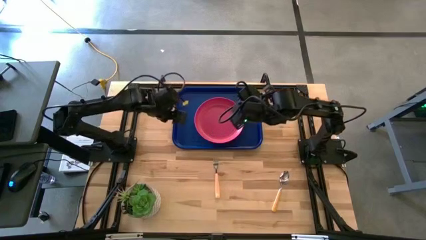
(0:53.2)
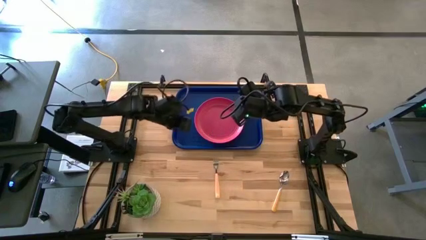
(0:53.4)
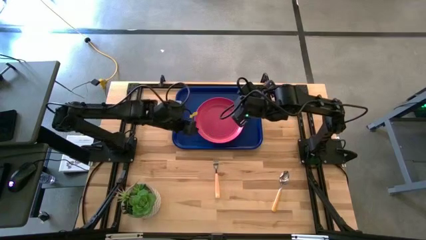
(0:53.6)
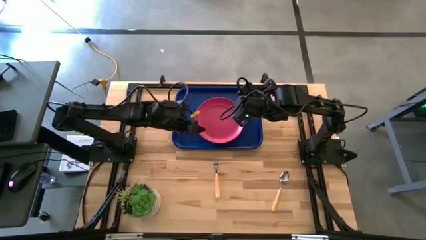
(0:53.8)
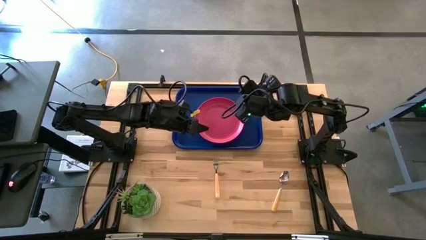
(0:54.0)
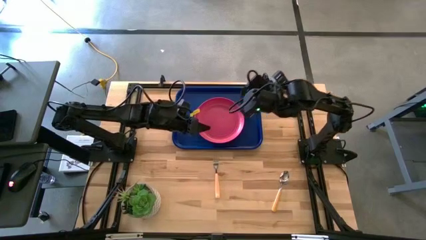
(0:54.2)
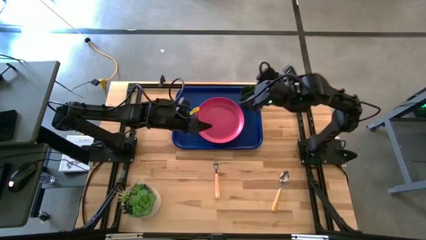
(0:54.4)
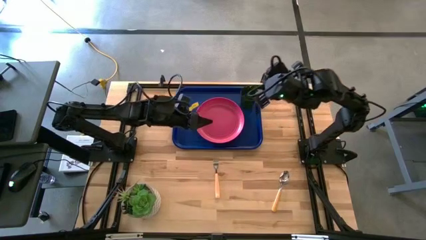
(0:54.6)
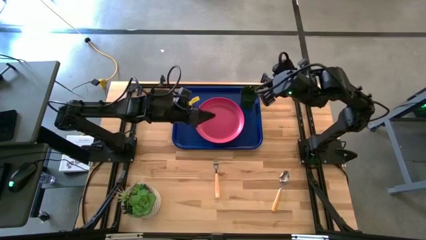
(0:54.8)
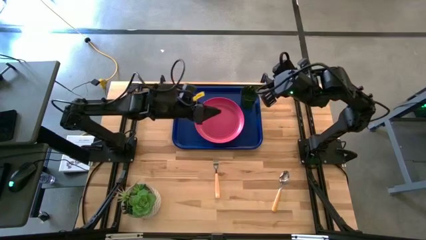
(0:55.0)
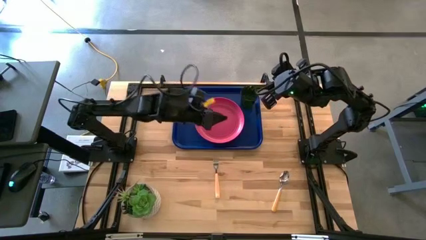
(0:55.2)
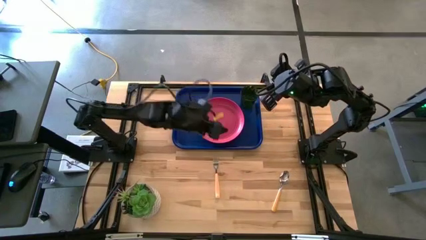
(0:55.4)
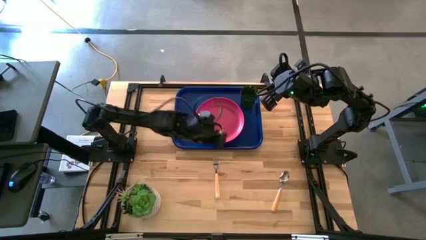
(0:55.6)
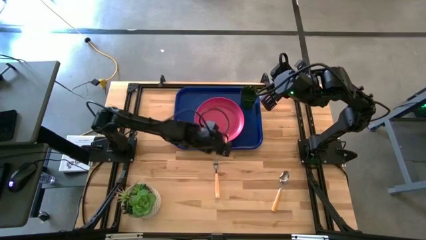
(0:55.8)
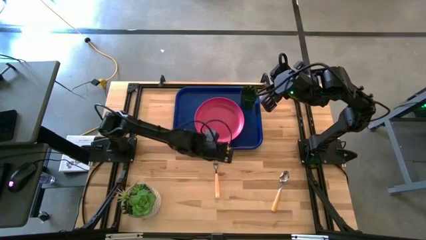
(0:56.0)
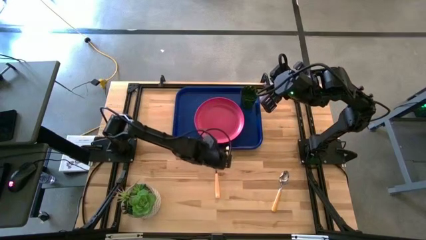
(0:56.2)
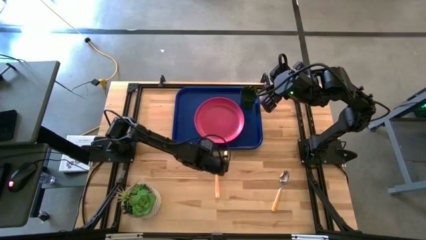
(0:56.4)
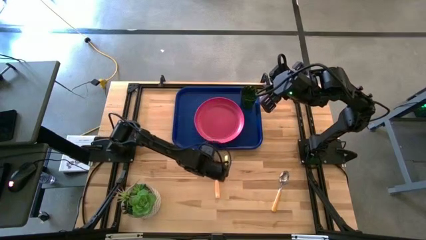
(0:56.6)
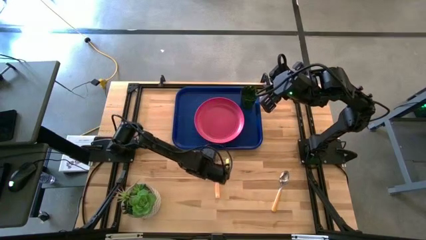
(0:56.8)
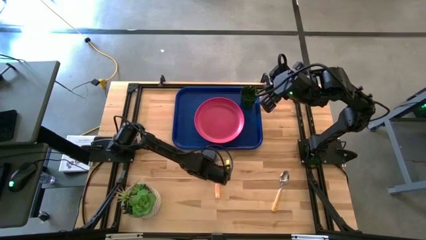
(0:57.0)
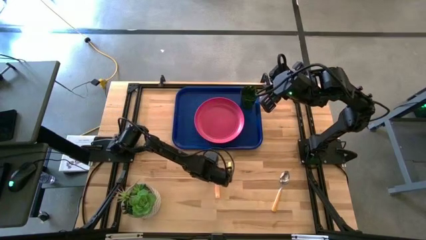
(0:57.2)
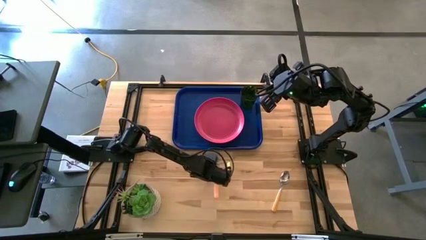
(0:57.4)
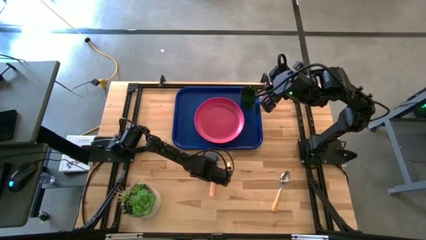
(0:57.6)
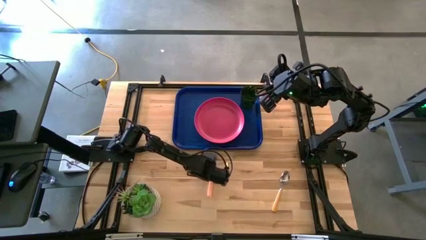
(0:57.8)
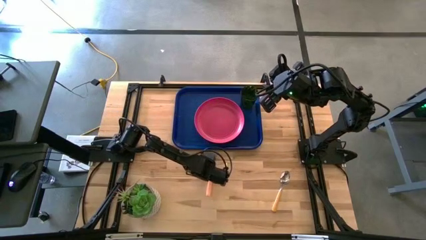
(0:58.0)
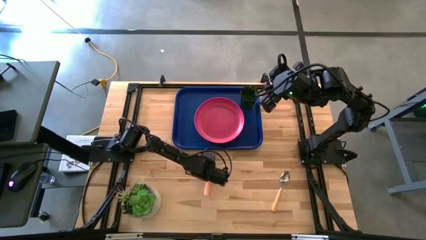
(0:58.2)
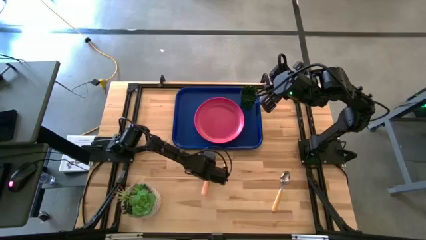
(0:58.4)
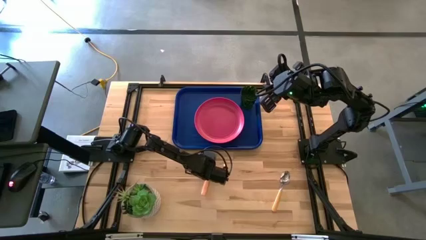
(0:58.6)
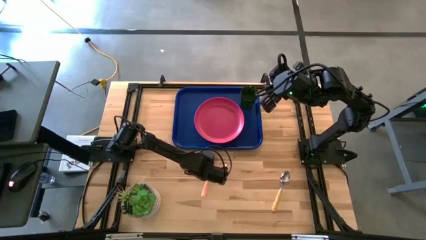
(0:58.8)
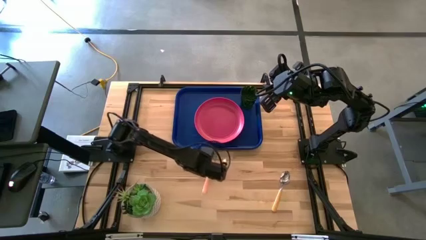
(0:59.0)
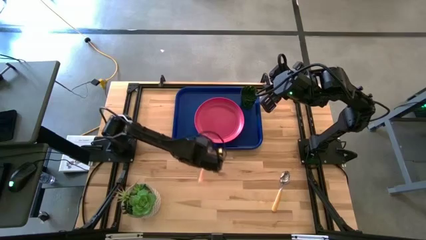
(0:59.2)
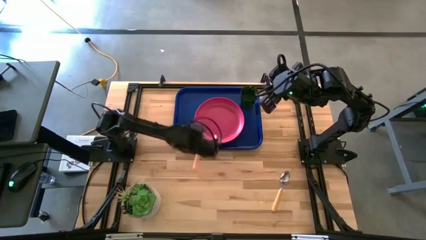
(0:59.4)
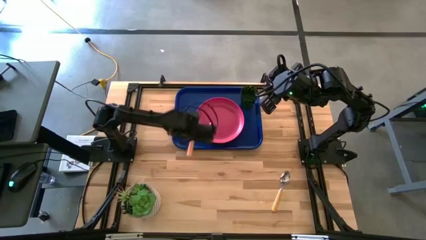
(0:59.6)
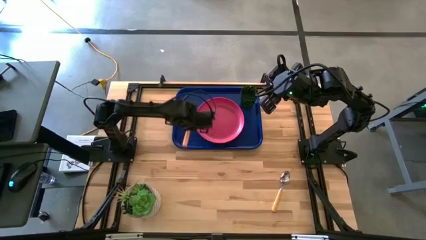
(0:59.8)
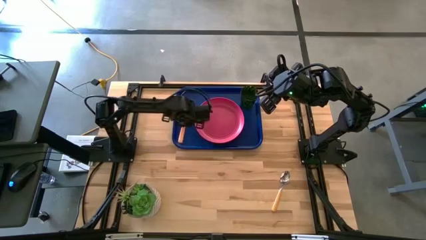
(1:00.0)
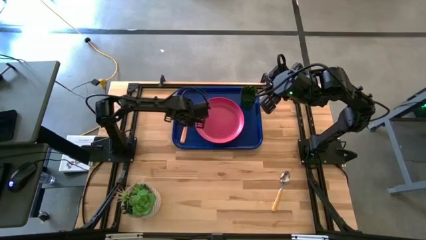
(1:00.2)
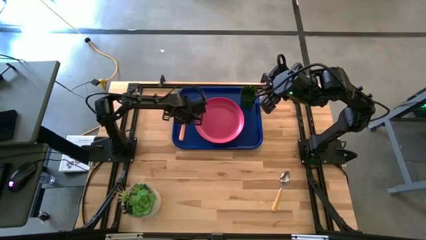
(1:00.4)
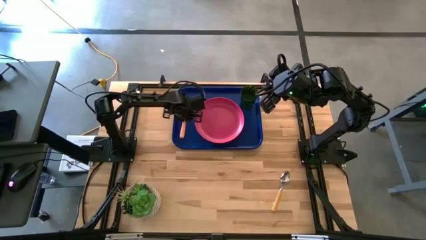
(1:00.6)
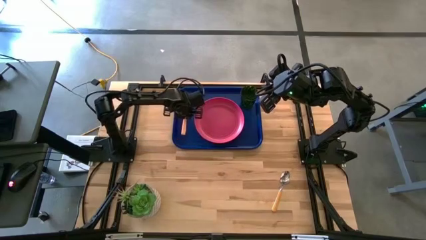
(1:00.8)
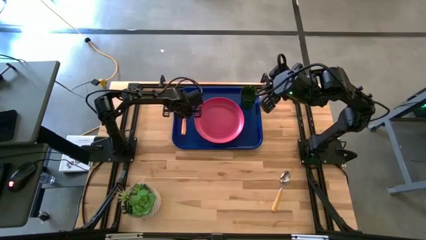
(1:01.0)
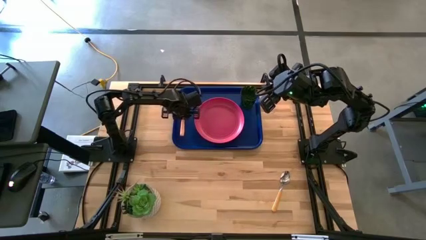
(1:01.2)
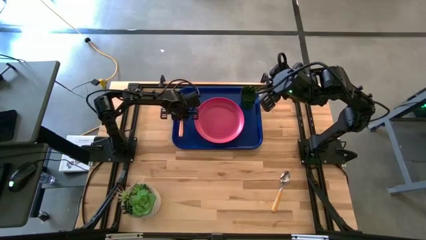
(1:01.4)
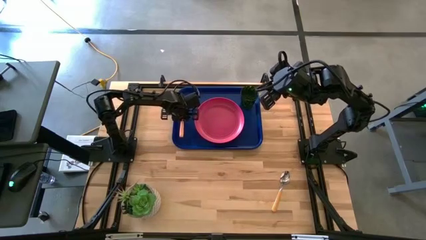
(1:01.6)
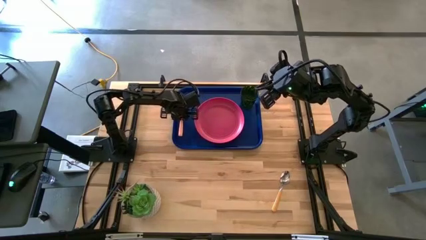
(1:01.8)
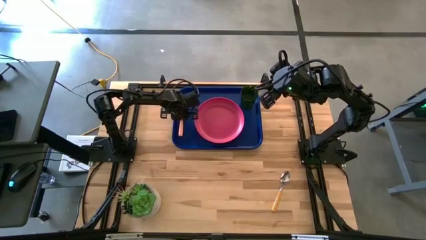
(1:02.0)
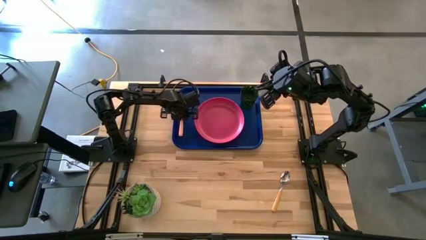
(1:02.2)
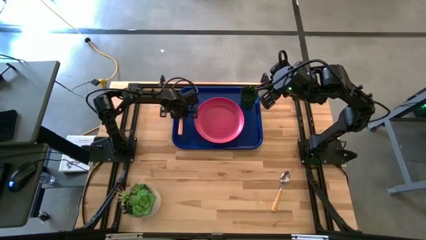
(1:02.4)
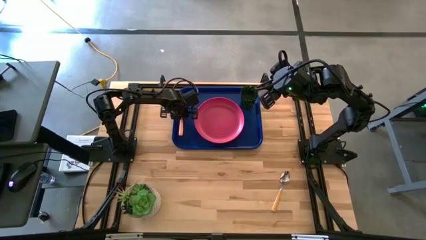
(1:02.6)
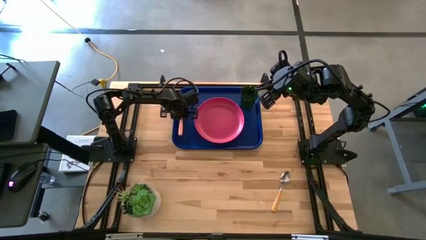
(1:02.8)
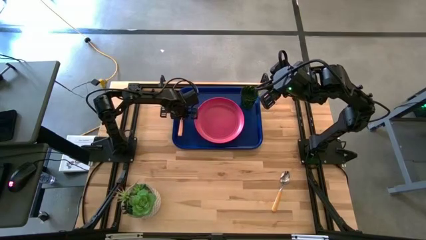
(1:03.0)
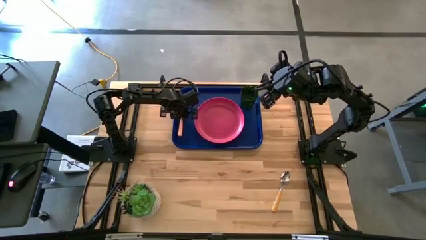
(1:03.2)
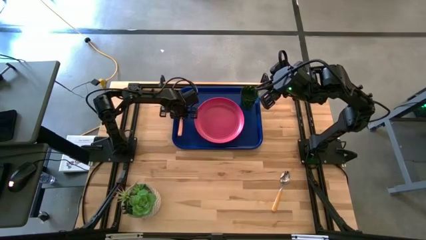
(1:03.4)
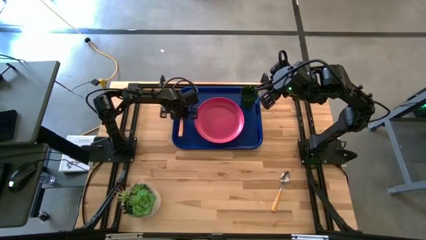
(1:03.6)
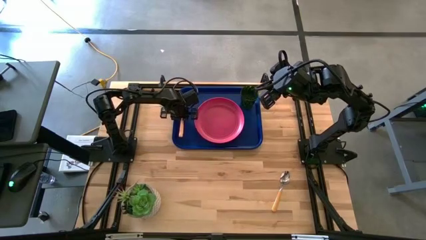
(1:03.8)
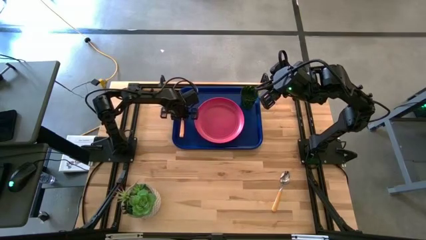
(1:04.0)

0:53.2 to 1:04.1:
Task: Pick and place plate/cup/fork/spoon on tray
Put the orange fork to the left side of the pink plate on the blue serving tray

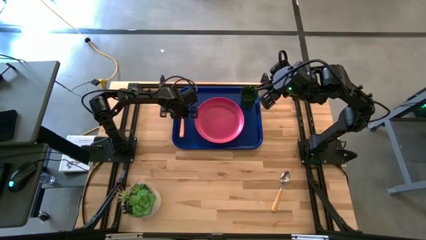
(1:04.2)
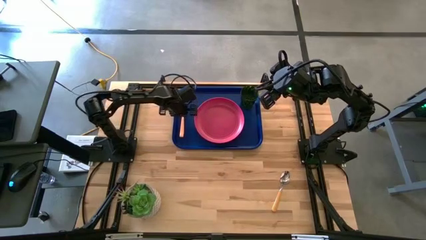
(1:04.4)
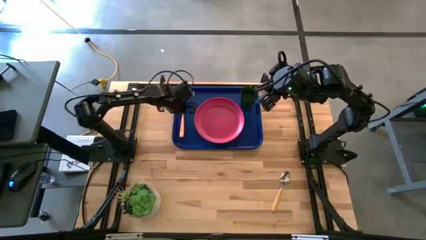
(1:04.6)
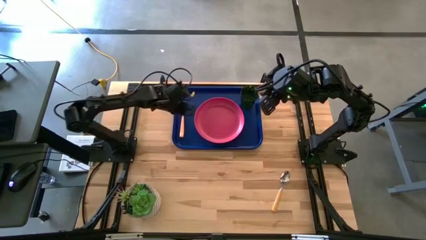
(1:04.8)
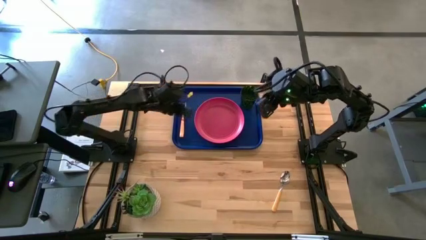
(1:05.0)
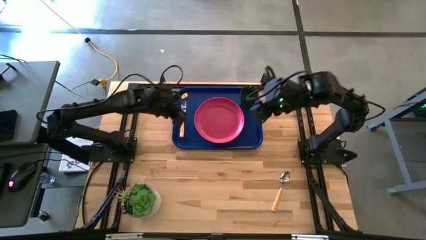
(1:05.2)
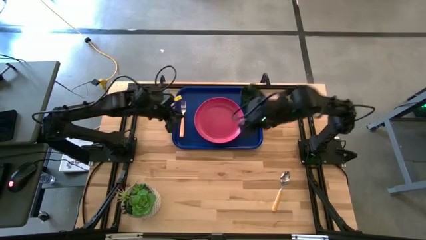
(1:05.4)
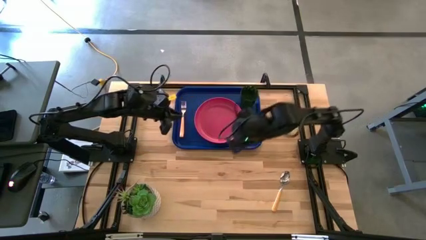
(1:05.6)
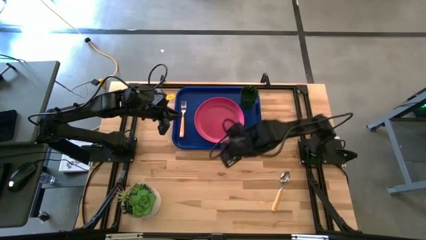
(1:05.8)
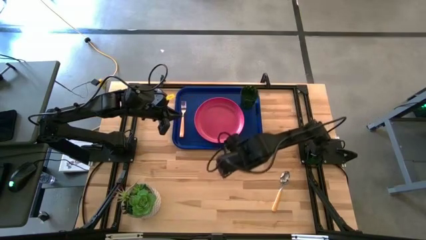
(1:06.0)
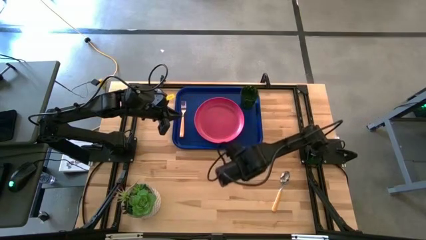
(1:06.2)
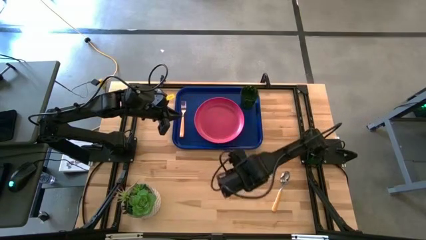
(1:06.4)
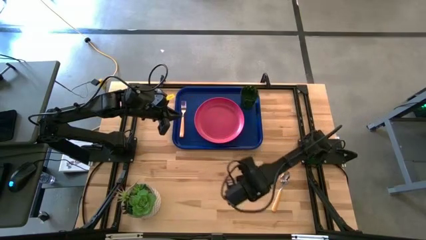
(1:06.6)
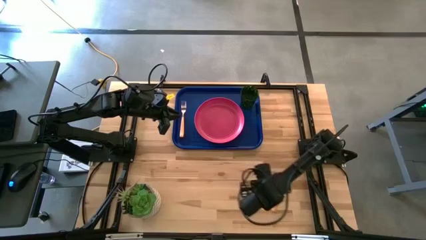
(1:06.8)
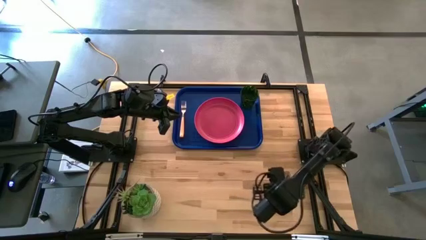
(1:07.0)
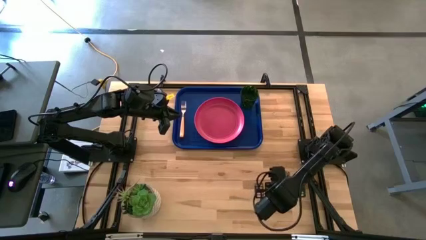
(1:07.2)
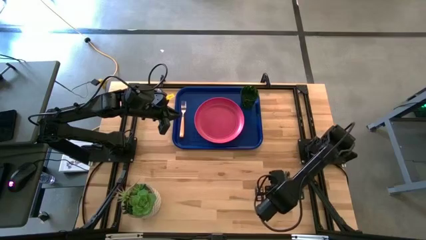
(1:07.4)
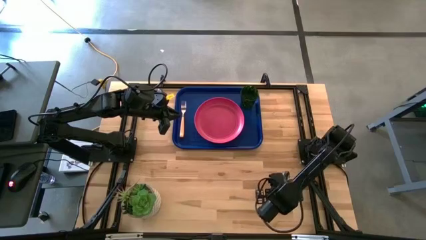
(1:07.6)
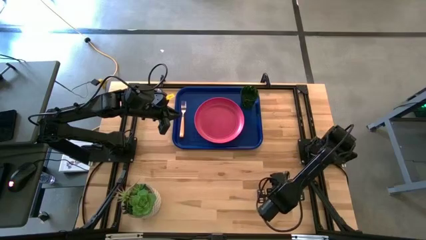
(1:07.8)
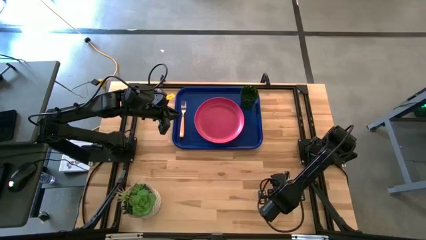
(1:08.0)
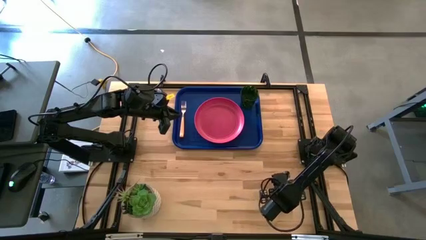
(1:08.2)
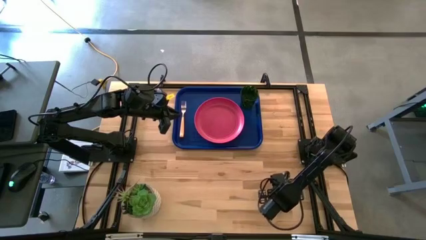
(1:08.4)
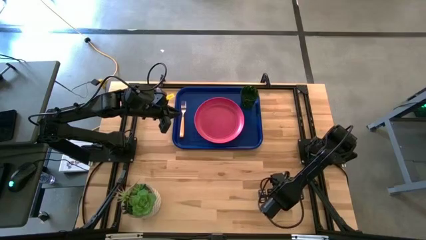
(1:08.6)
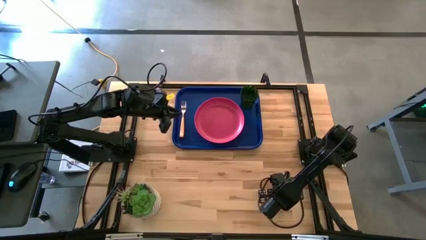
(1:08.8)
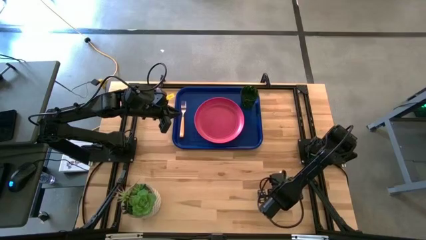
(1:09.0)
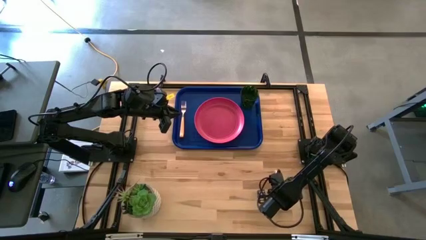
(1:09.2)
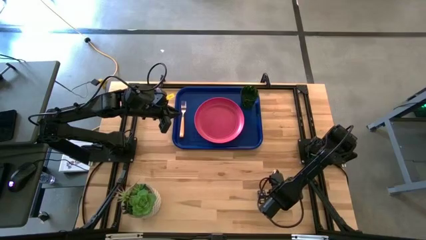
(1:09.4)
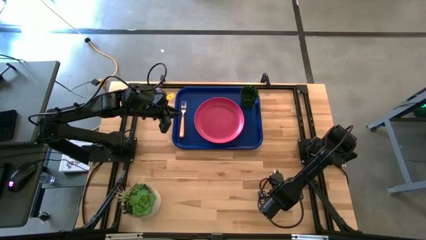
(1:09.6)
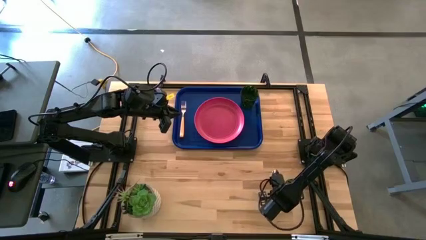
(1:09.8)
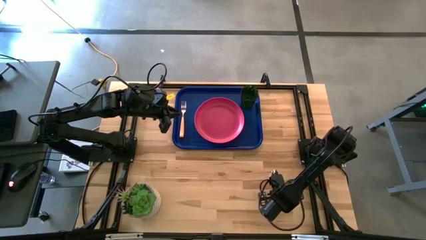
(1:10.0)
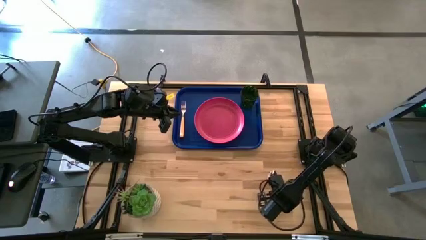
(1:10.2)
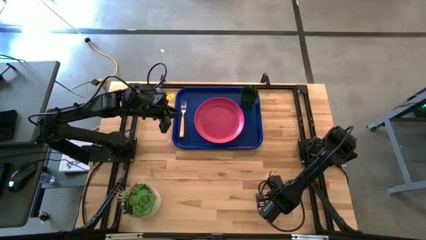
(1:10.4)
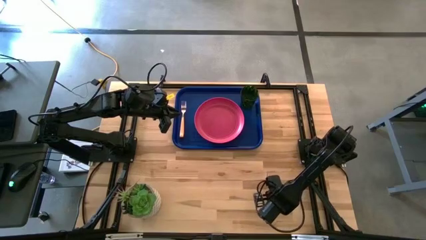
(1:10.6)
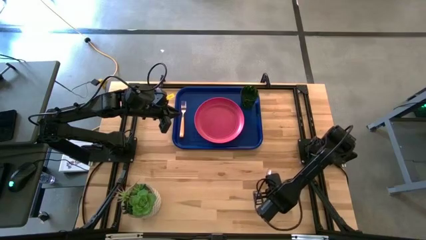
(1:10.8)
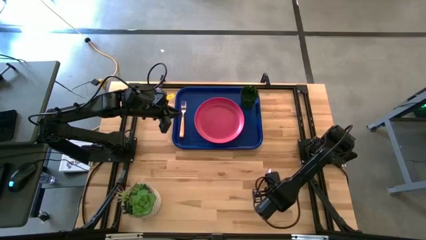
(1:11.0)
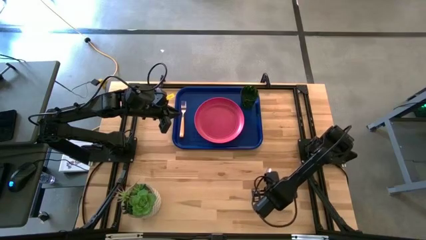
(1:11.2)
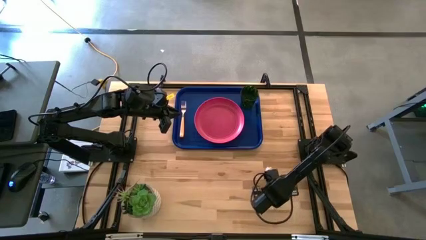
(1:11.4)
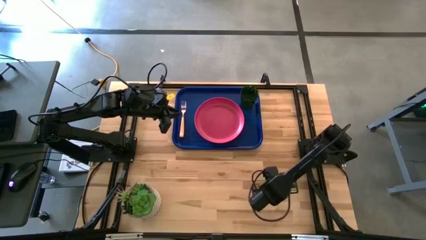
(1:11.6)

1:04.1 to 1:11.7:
Put the yellow spoon between the fork and plate on the blue serving tray
